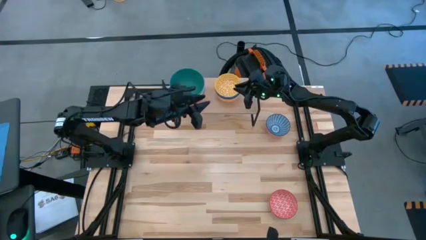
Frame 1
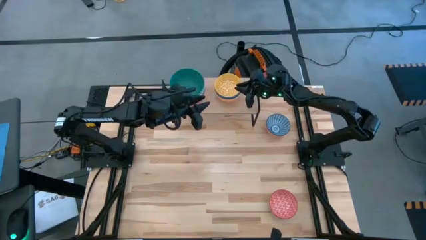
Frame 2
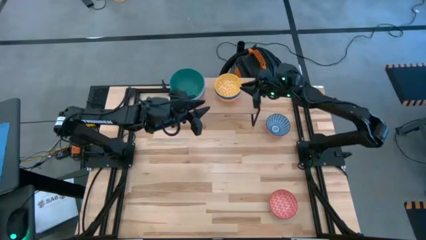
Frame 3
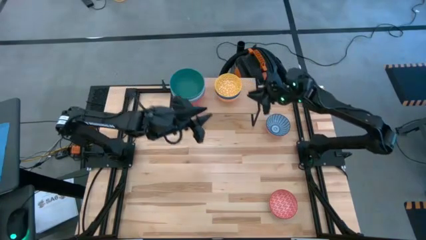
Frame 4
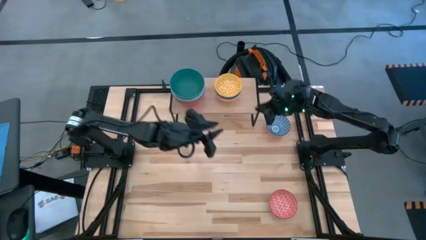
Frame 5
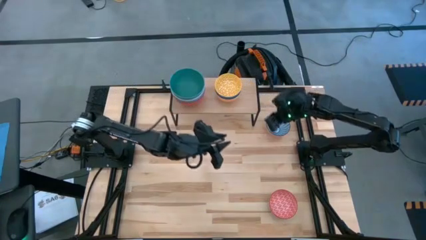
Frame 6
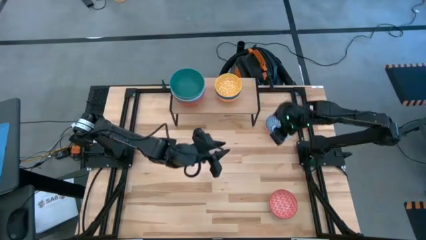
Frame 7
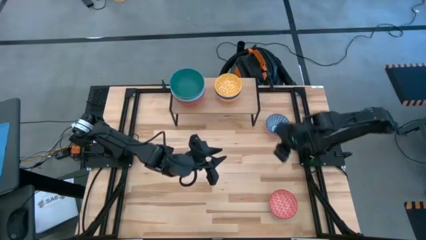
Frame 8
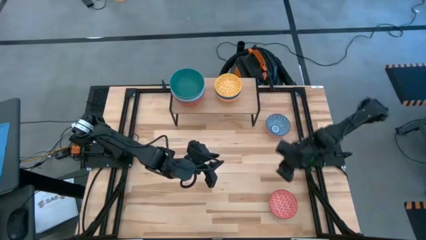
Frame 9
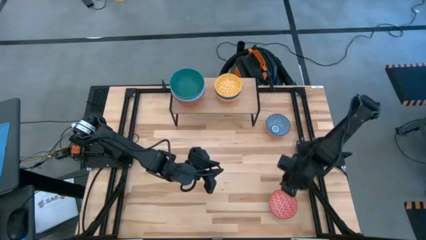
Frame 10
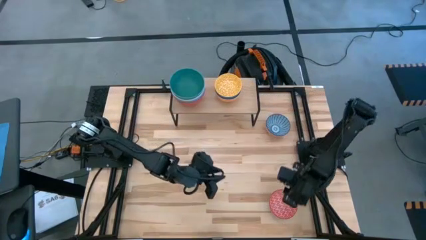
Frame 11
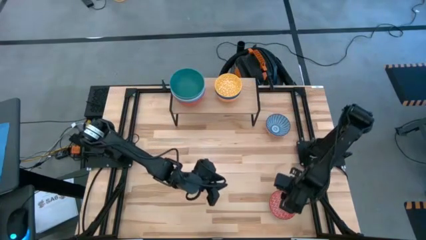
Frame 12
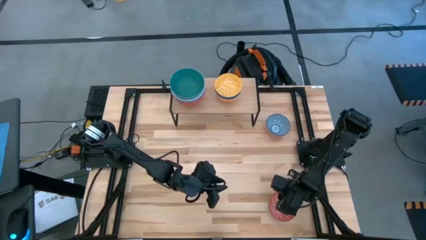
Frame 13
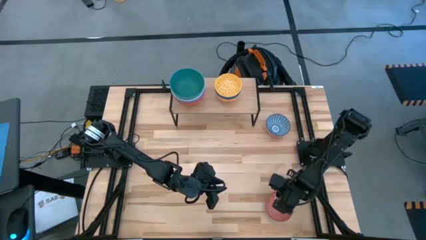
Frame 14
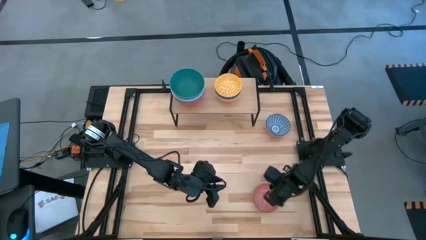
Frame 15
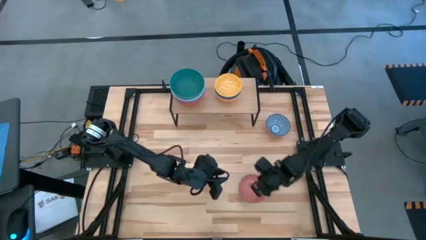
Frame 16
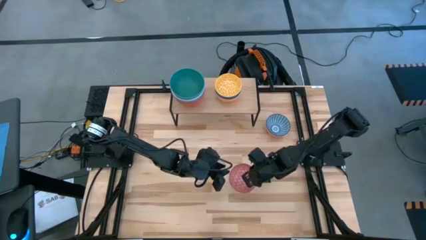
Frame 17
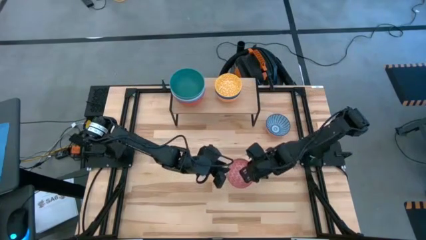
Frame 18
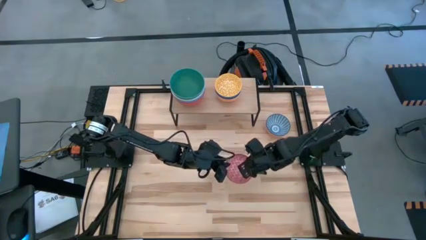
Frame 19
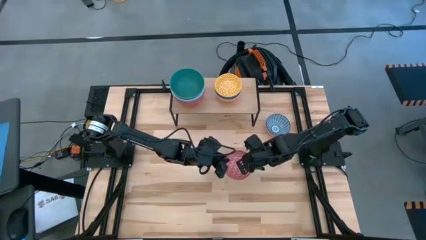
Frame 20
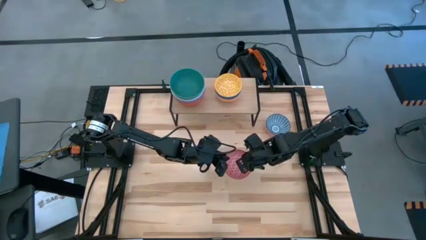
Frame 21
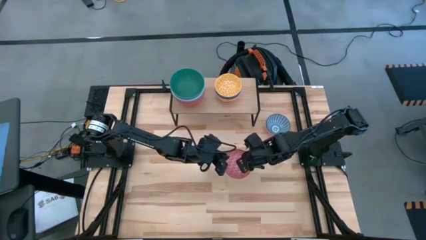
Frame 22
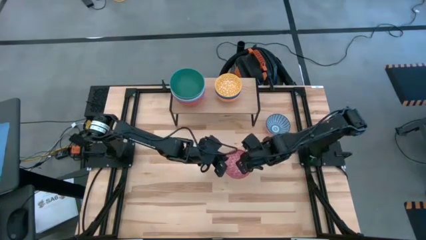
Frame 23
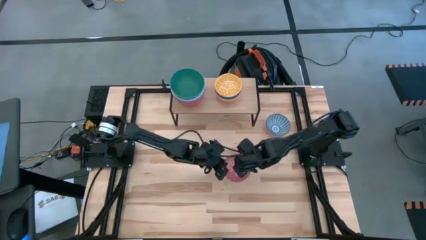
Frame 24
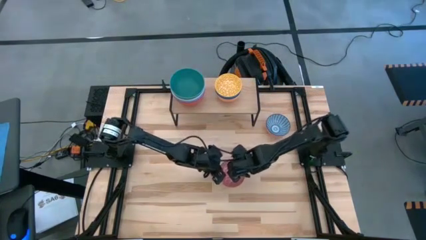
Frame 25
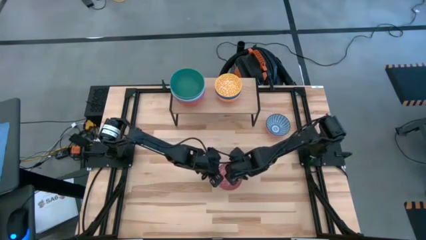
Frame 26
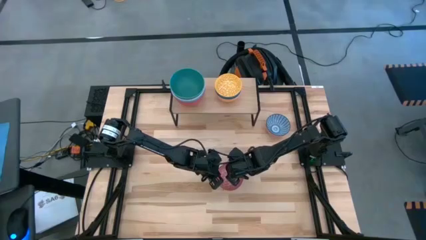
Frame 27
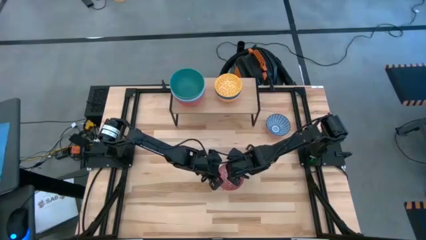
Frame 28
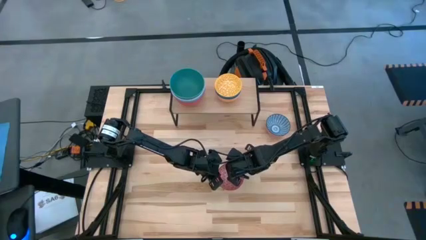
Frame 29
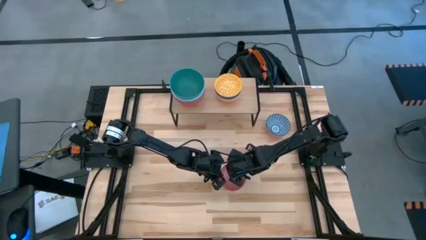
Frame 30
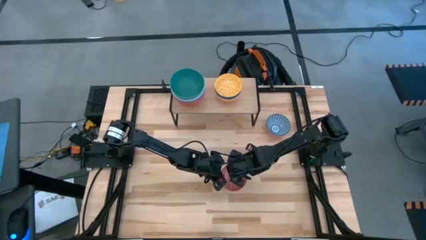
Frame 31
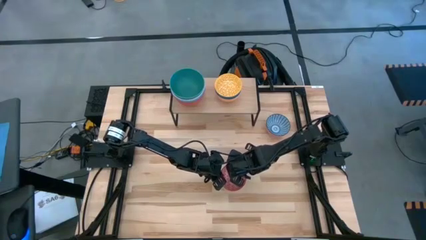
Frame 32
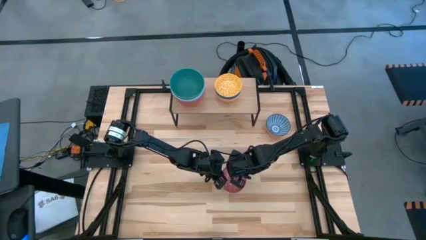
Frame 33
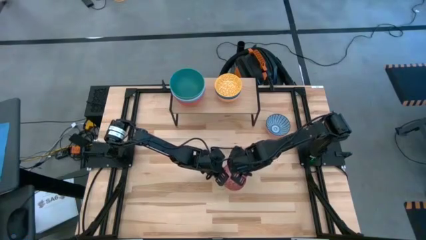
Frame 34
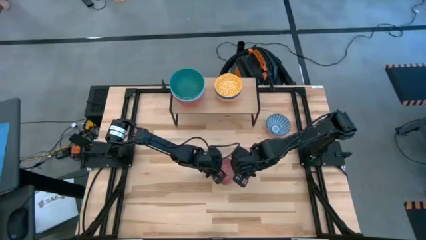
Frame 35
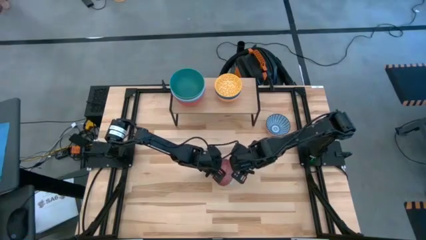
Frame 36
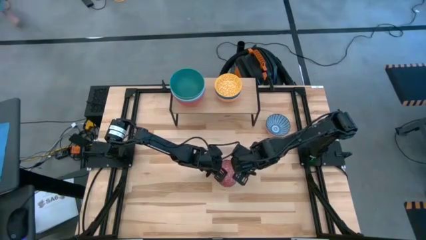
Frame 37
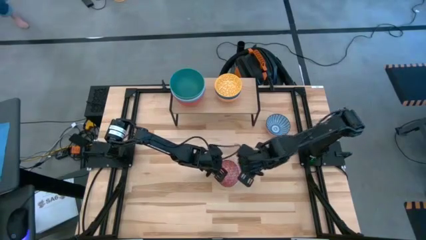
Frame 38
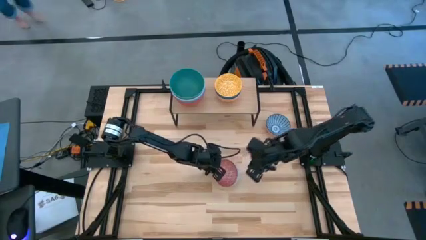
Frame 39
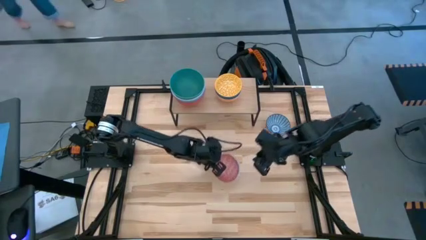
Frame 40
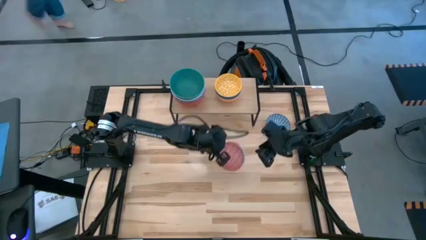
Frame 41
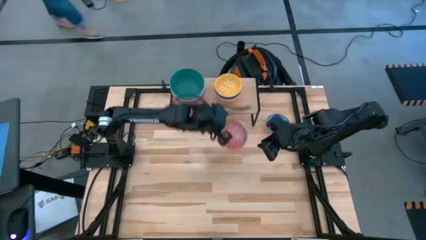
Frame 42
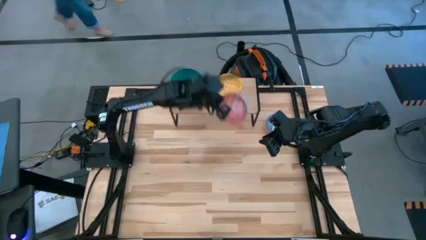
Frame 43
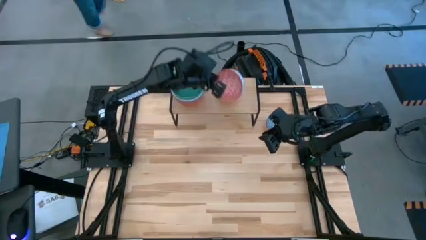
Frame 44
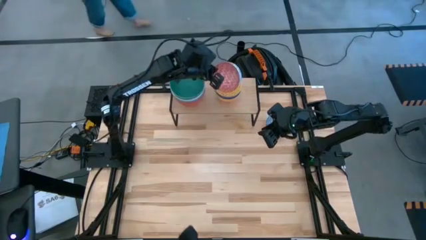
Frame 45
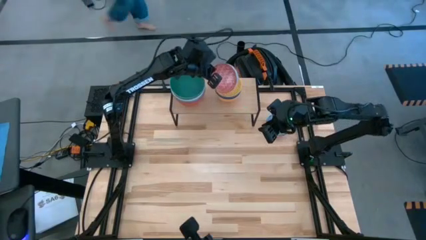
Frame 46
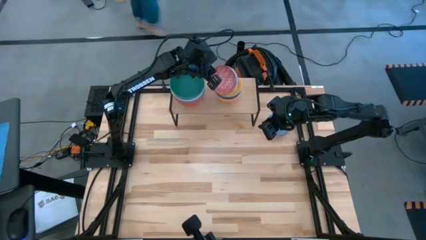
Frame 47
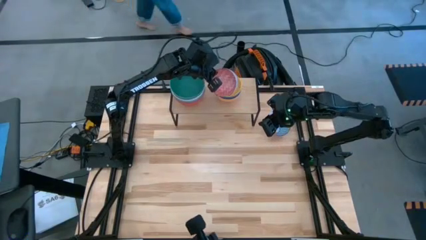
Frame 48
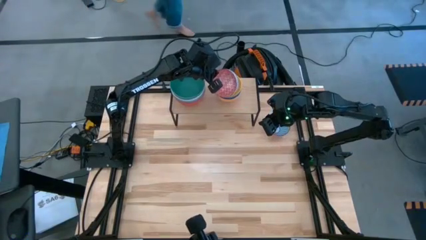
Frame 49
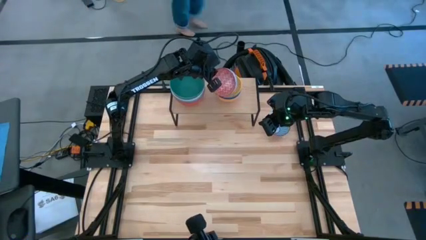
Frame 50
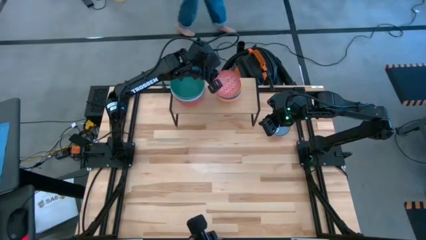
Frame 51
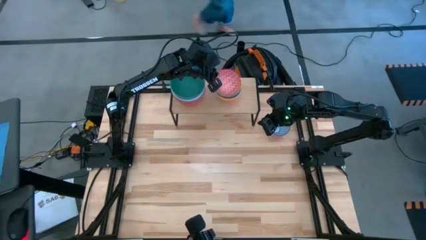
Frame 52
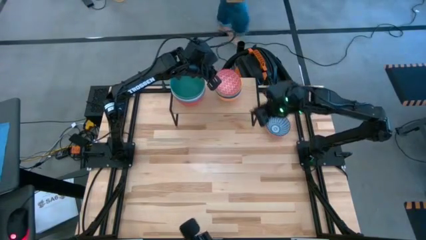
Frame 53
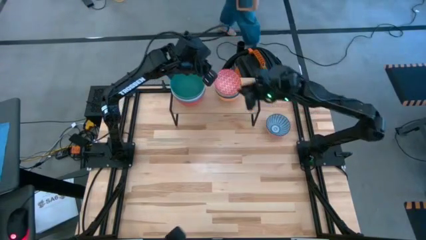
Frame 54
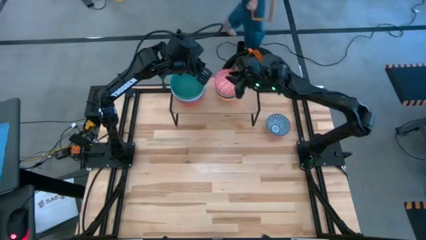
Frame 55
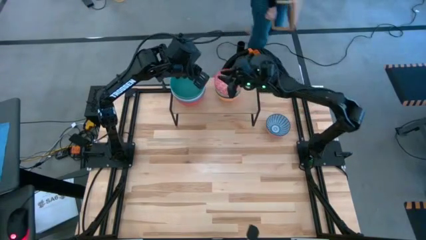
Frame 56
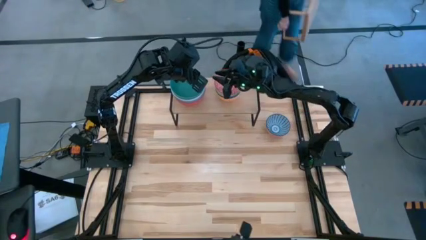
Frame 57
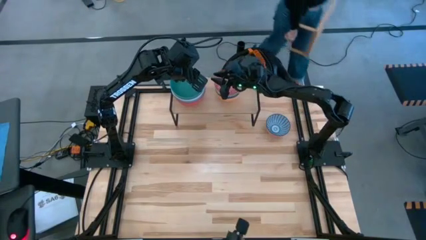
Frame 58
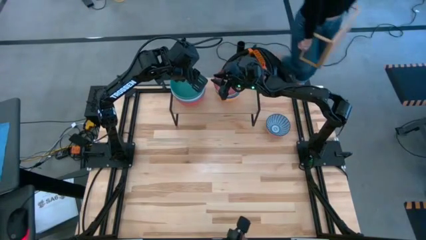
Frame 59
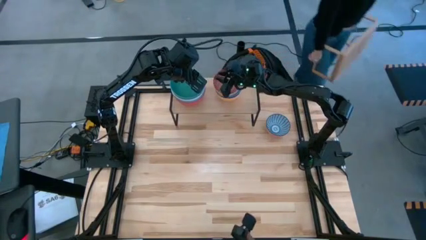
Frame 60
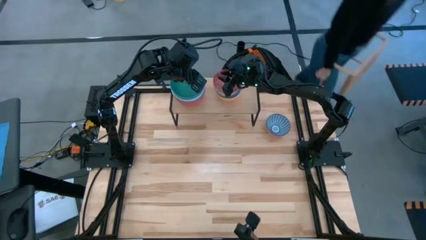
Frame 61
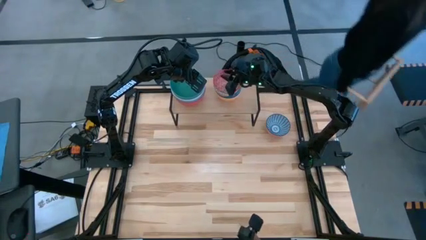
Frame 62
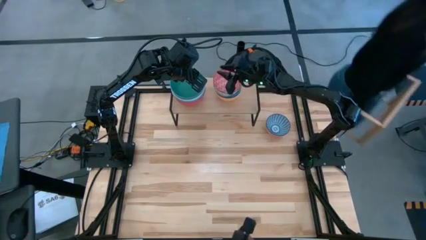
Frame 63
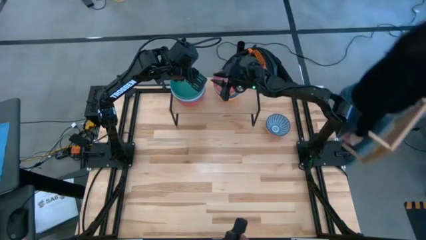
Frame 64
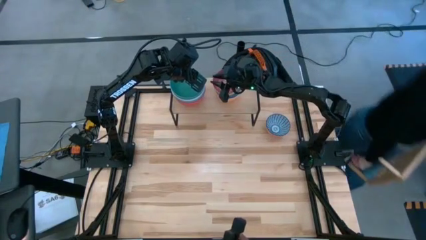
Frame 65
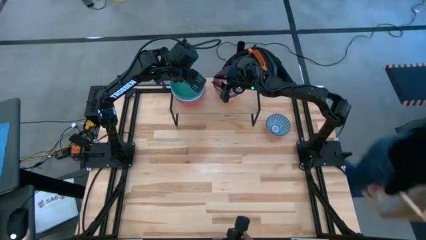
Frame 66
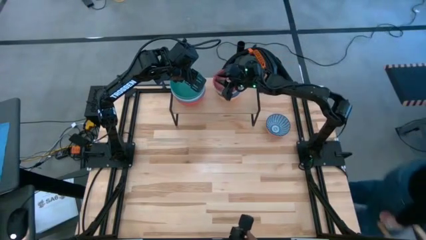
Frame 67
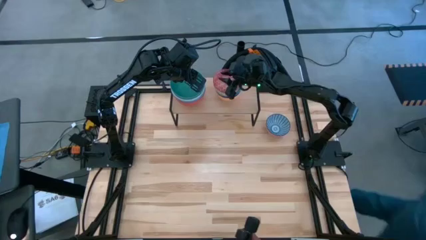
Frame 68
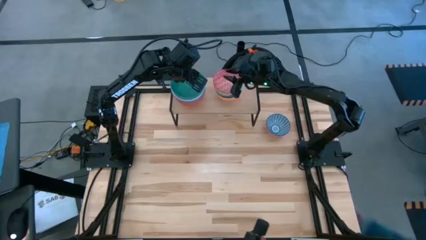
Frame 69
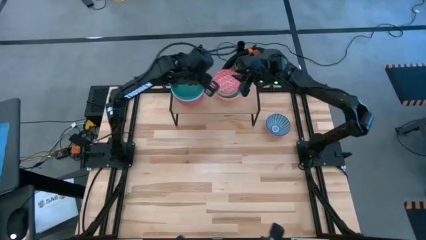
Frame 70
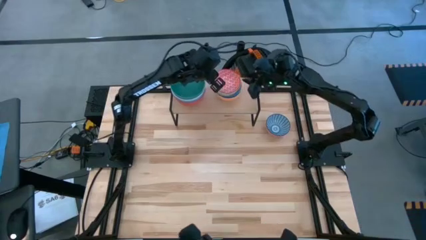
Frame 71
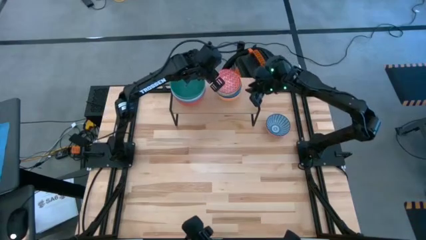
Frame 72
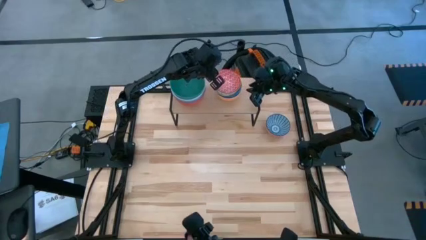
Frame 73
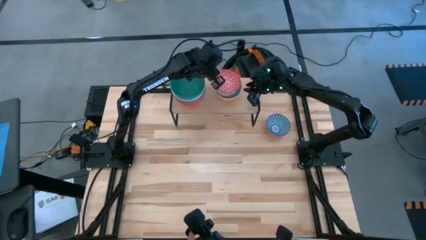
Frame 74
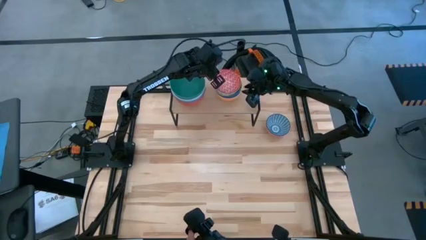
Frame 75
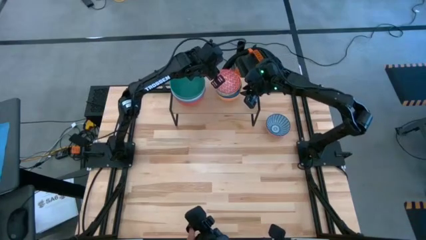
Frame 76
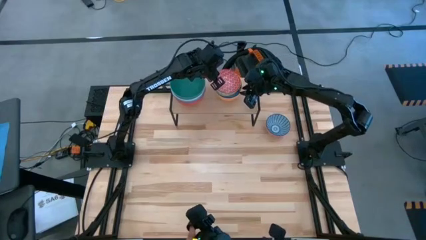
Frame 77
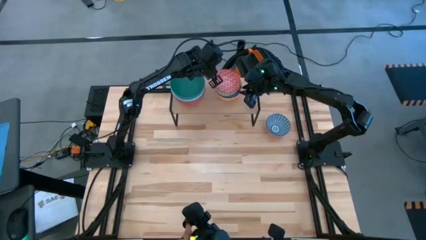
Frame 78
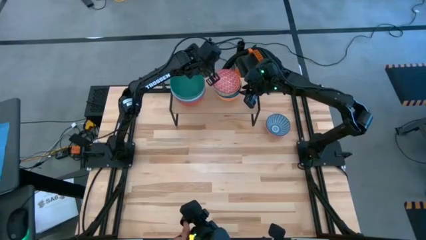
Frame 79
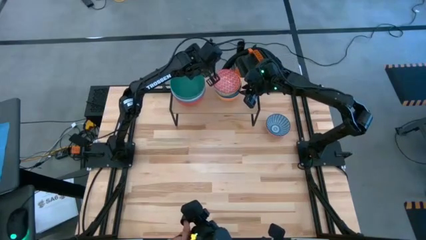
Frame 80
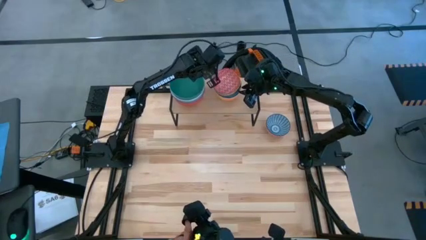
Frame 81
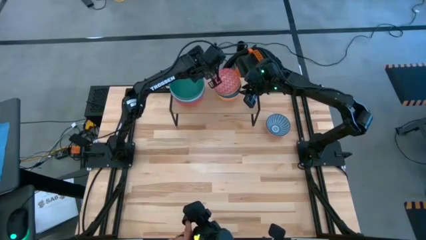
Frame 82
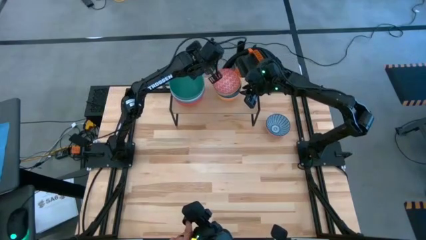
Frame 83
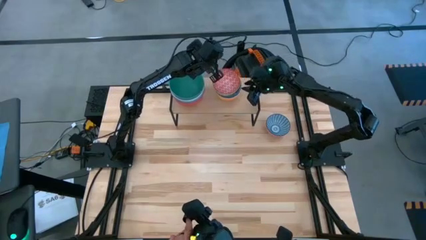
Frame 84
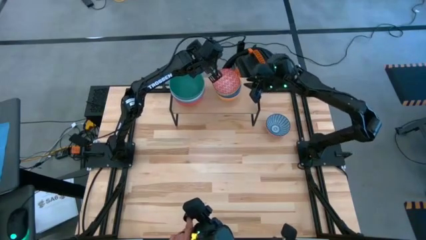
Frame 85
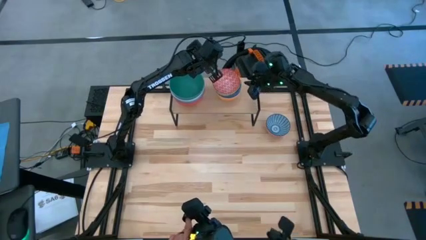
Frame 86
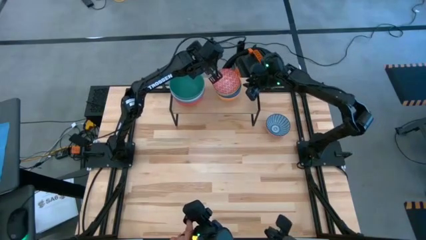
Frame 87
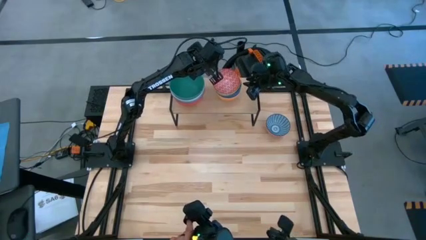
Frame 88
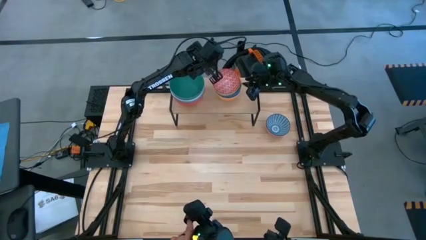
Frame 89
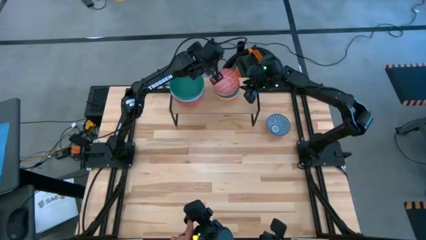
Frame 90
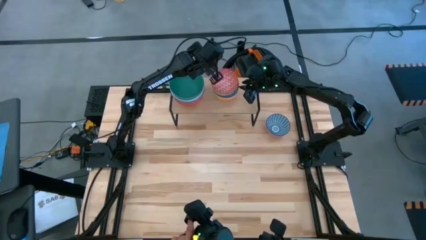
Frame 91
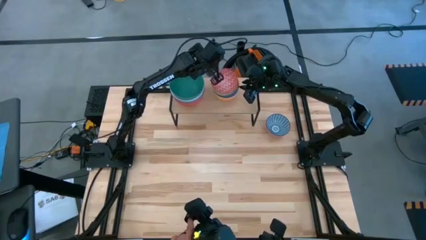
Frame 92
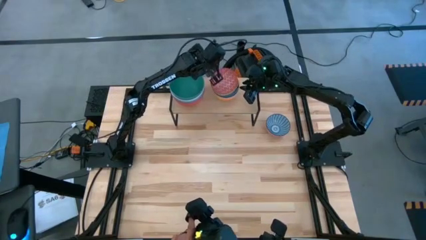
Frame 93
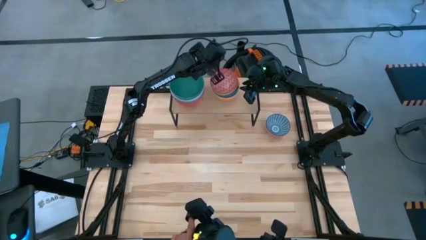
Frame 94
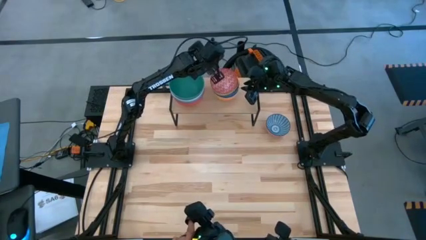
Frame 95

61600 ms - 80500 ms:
Task: Place and stack bowls onto a shelf
Stack the red pattern bowl on top of the yellow pattern bowl on the shelf
